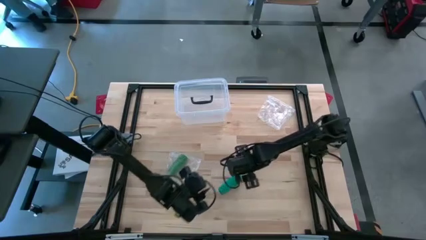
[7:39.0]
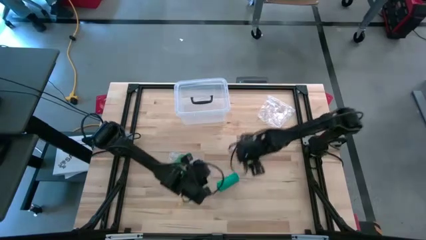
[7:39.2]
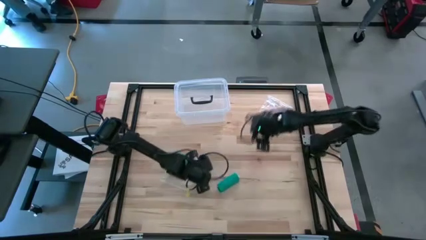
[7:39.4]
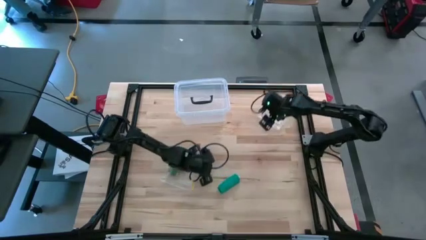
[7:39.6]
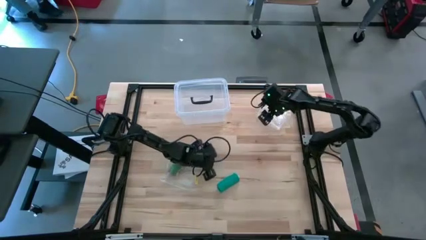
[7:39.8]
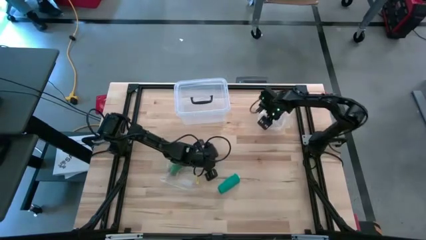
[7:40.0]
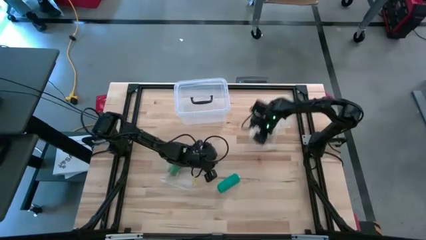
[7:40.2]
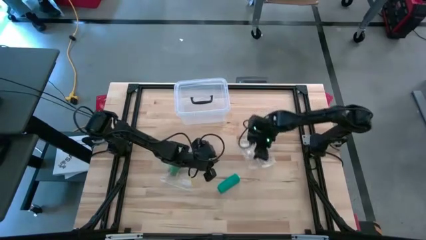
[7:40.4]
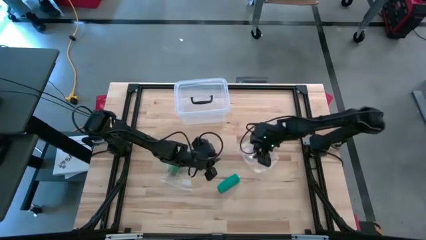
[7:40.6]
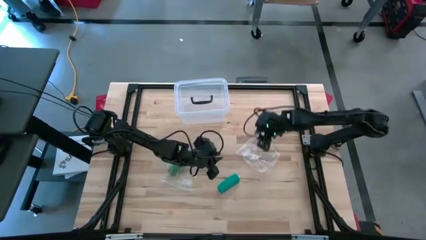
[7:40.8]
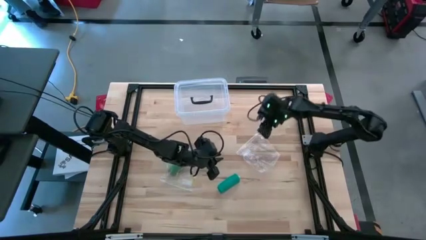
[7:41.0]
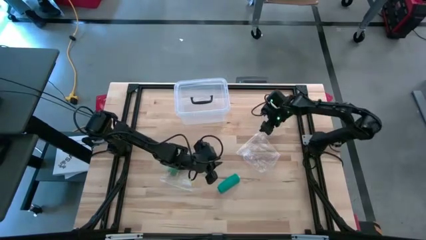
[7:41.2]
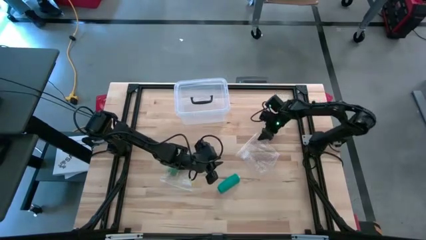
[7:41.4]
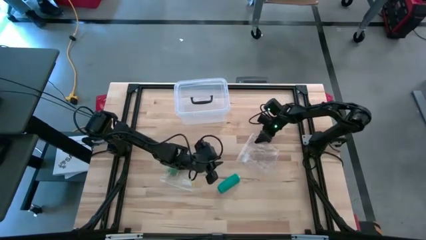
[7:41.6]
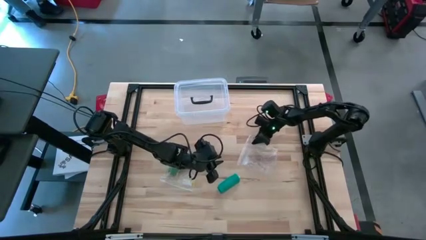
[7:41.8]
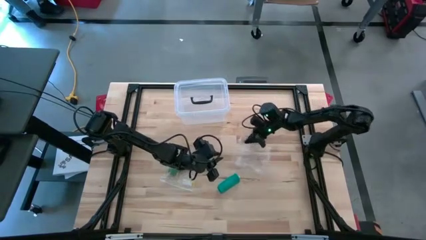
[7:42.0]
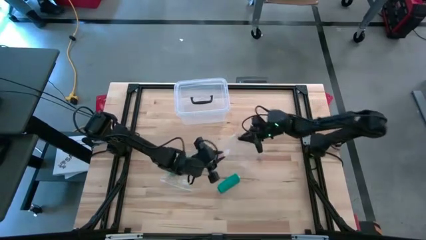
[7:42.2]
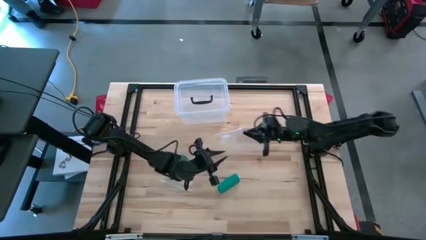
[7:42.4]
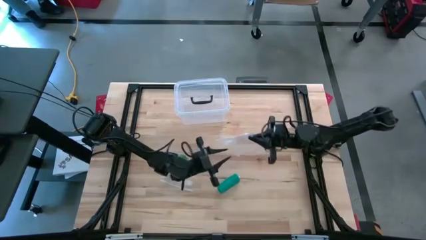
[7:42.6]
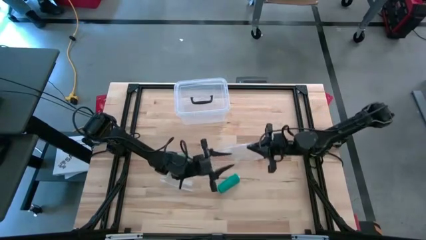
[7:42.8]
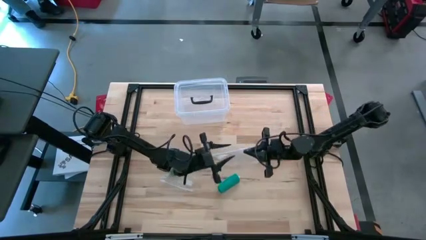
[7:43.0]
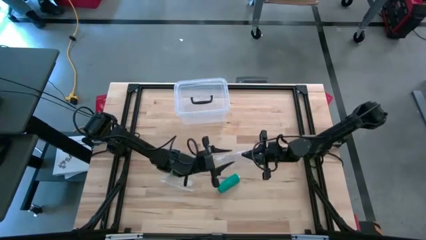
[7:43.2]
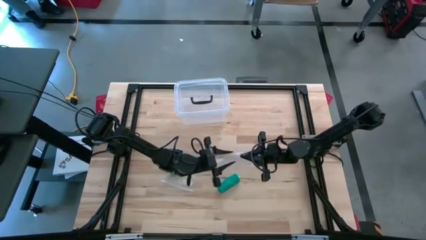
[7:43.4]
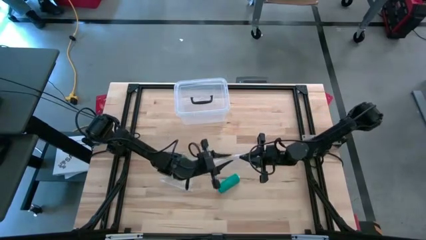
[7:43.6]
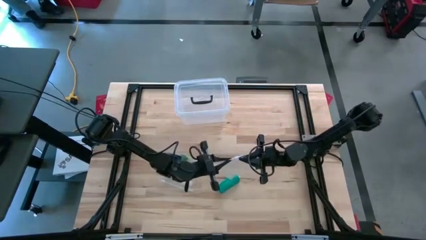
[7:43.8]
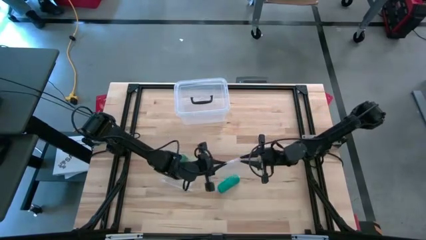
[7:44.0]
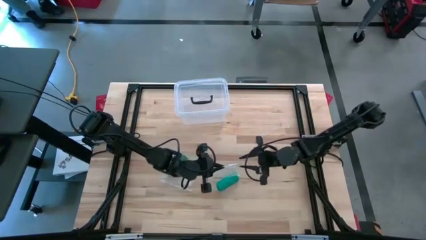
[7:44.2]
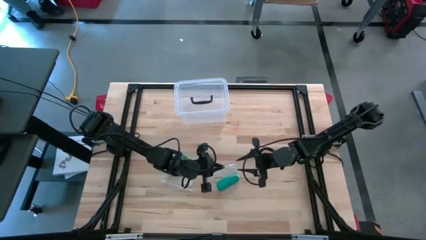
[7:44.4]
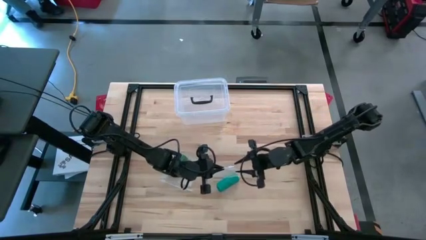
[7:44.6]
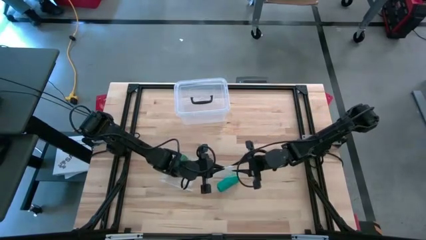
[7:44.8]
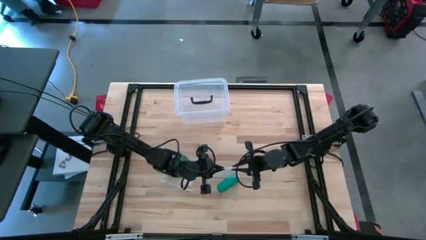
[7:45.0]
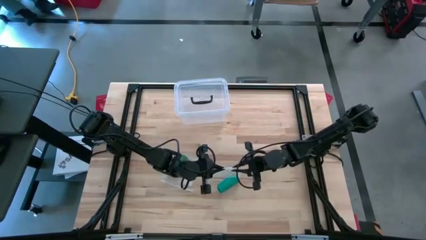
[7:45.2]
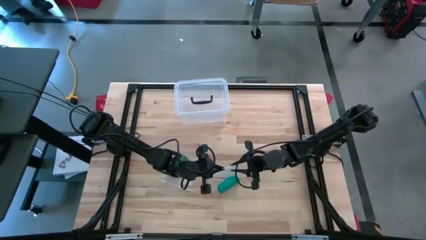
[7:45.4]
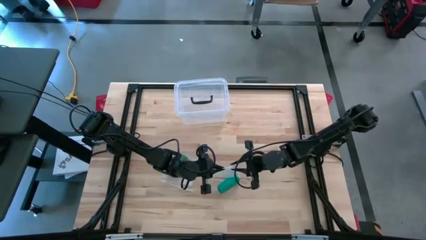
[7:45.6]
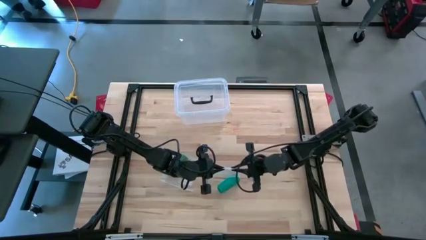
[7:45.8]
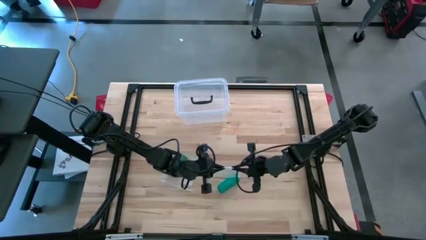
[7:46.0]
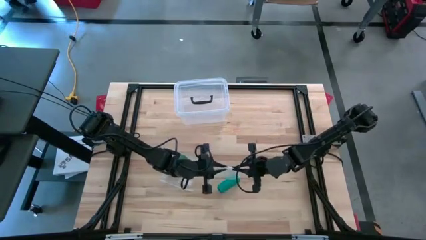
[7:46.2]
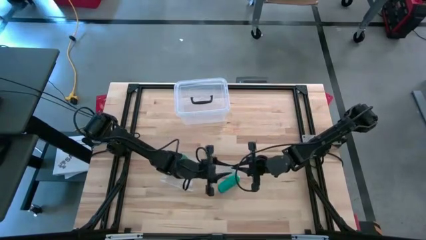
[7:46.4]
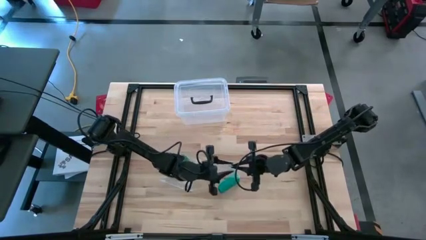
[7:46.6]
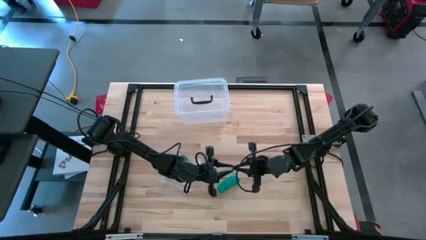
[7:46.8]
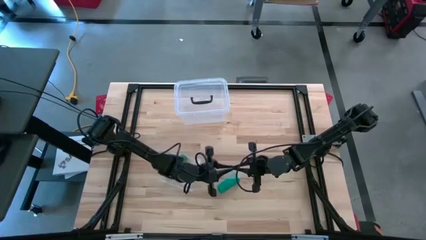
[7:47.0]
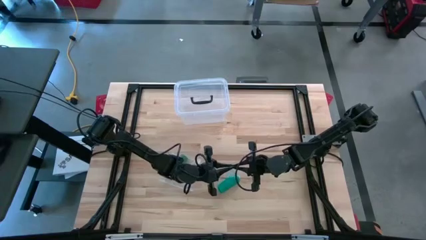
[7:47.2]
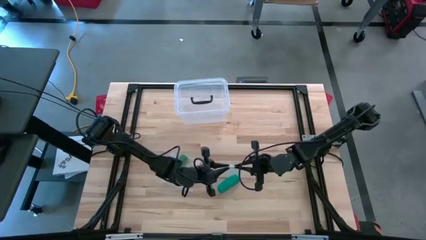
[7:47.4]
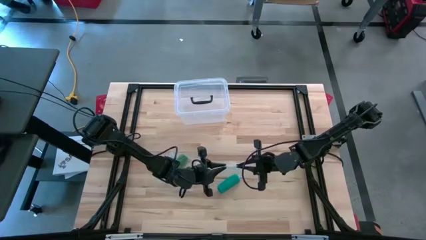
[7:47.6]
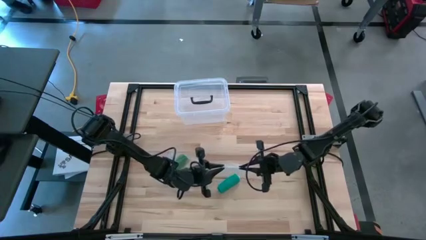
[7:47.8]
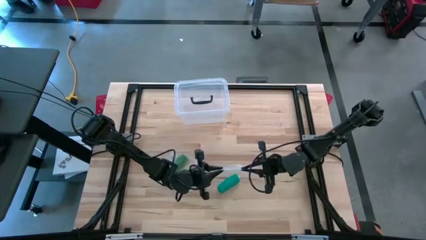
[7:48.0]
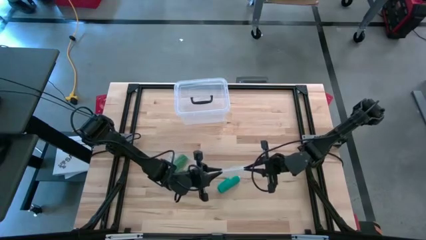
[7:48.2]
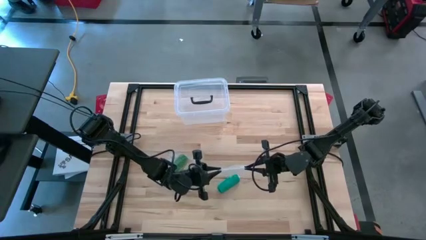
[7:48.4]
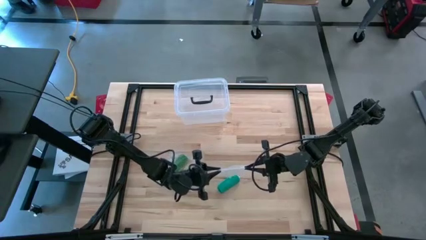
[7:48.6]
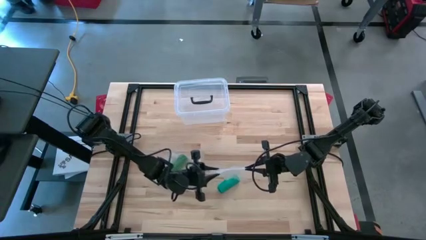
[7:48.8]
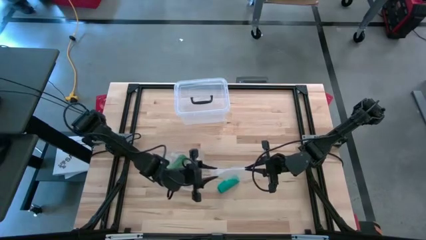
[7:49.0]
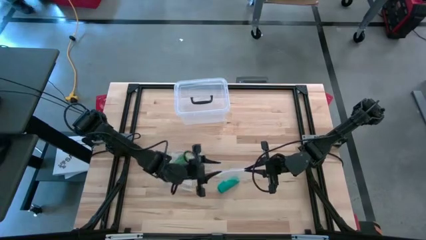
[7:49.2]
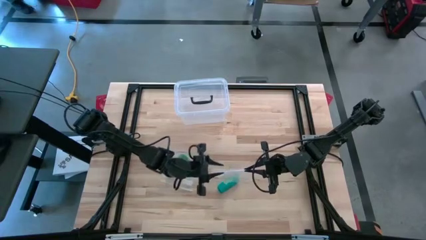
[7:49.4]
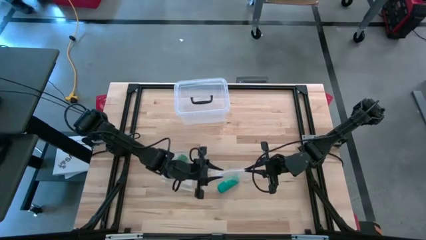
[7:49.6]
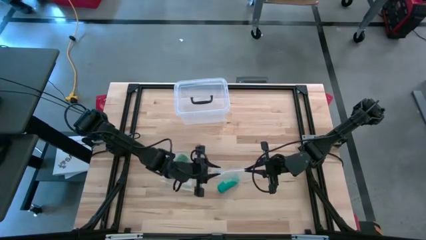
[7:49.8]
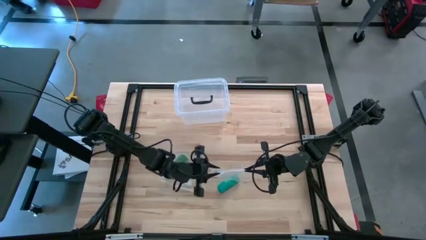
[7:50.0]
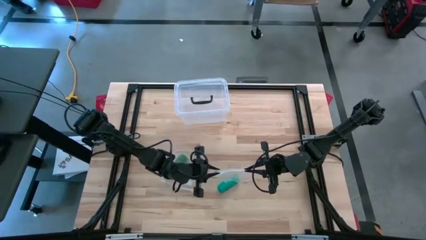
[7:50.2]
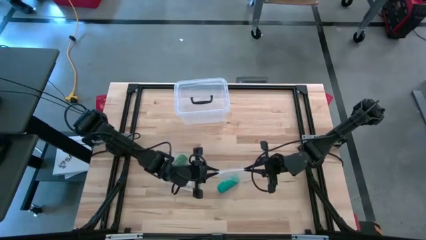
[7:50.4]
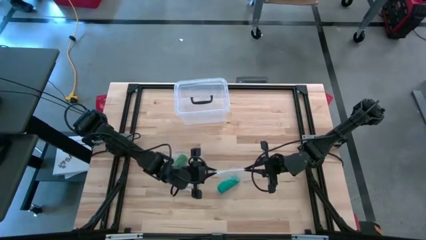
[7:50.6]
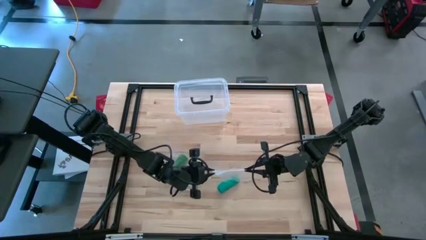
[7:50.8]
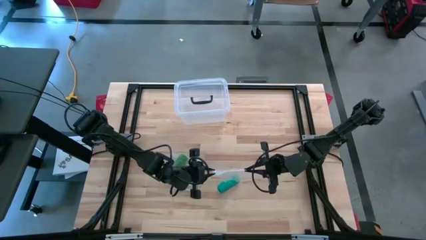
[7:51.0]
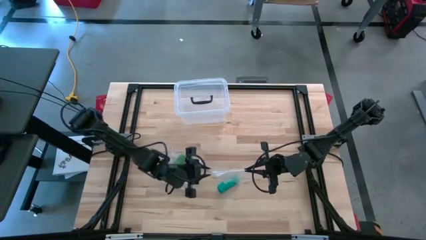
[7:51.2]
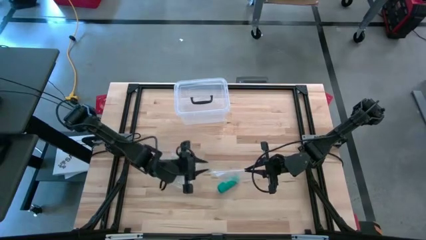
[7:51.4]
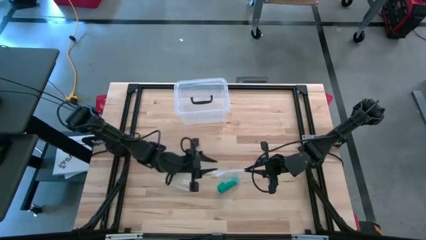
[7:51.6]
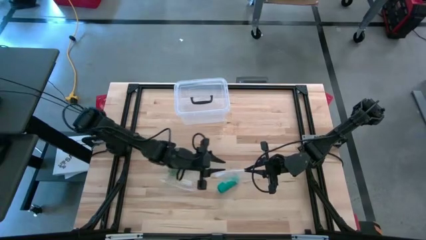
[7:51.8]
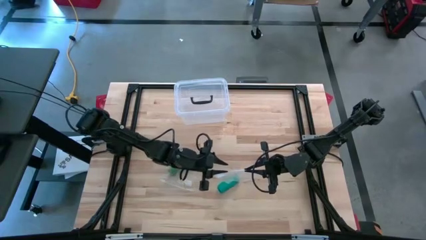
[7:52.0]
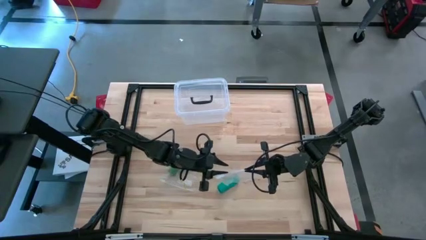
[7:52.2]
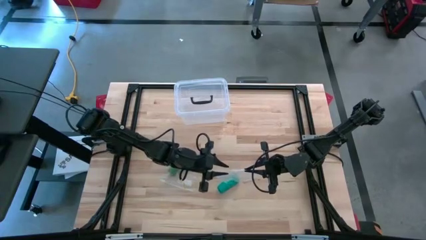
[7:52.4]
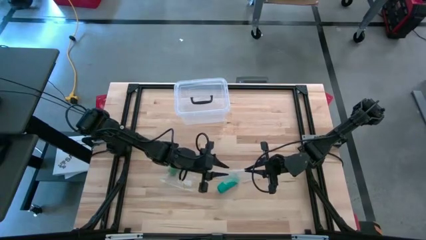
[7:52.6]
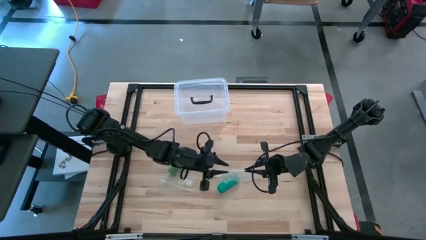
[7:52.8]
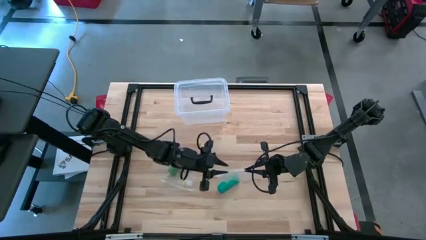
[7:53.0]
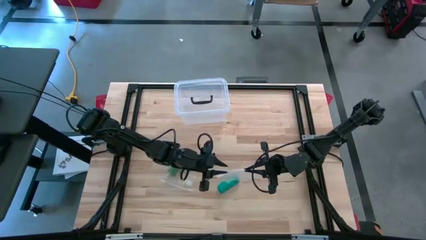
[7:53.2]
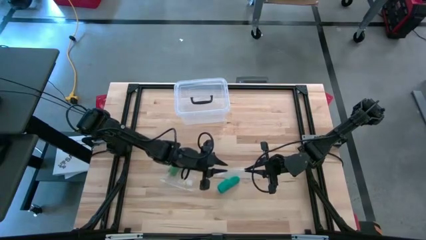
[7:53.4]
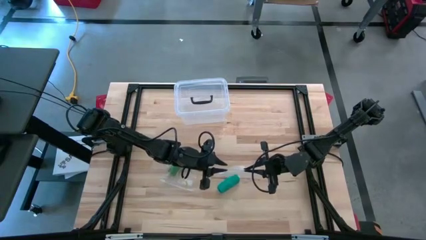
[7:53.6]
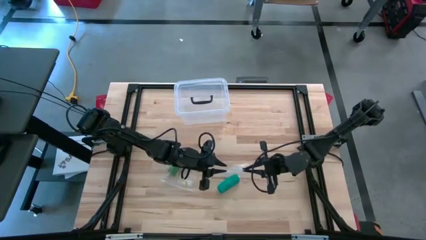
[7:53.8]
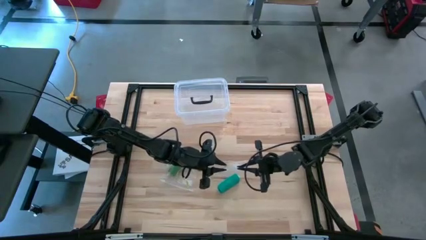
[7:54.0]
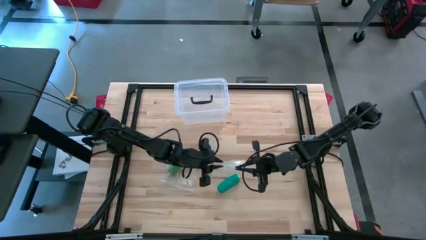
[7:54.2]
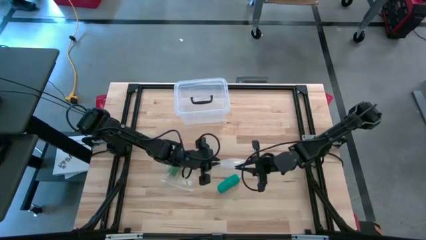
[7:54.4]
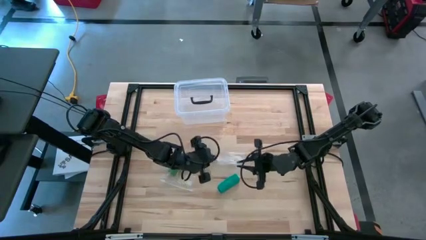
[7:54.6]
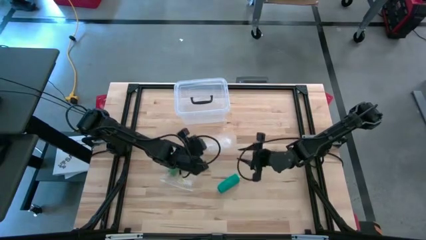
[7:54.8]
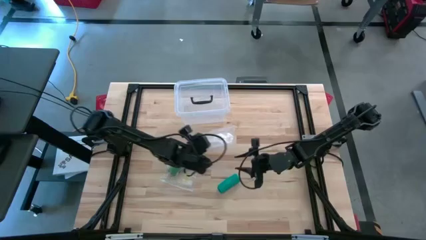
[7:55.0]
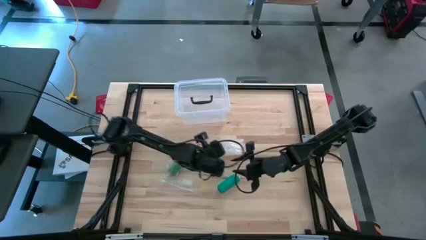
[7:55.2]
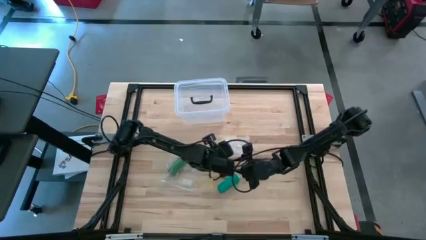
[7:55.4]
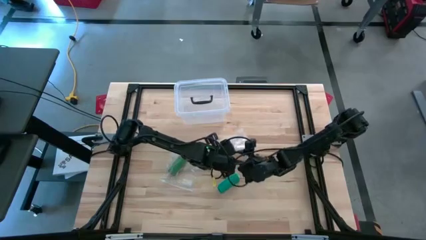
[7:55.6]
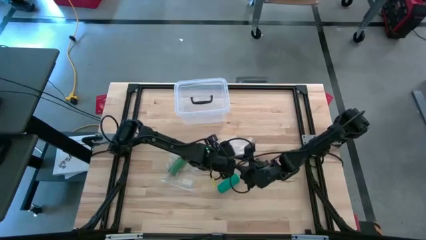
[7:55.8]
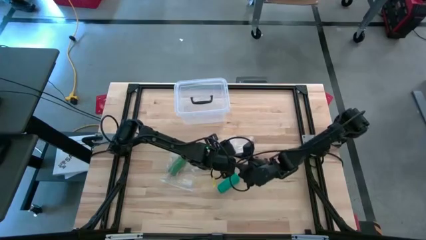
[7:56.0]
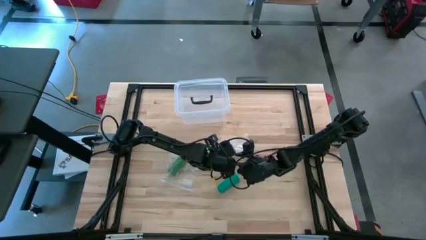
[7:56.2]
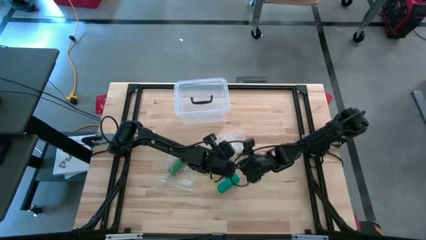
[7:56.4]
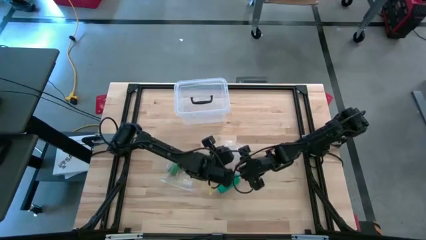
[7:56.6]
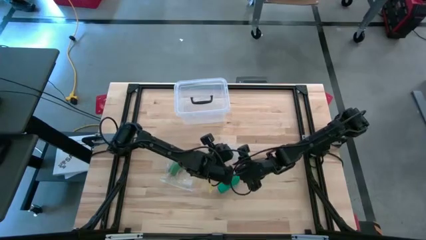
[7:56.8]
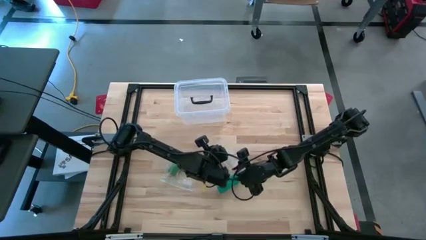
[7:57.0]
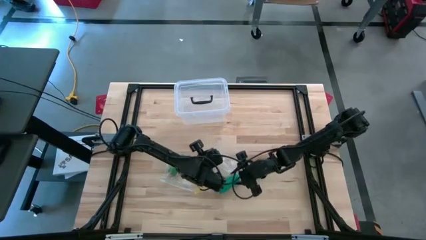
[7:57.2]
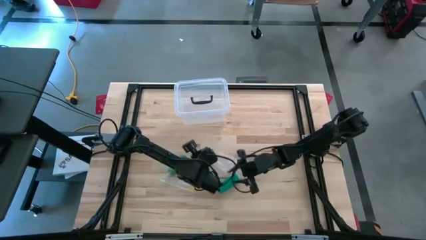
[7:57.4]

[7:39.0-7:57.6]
Task: Roll bandage
Open the zip bag
